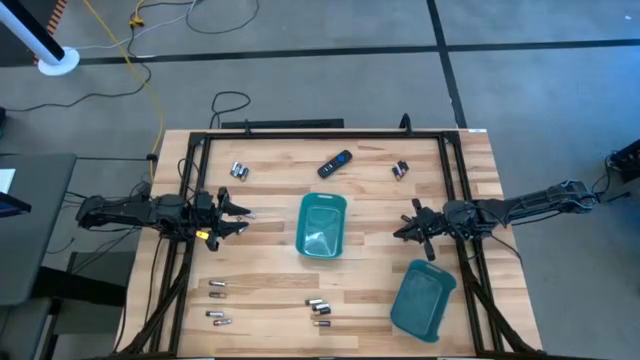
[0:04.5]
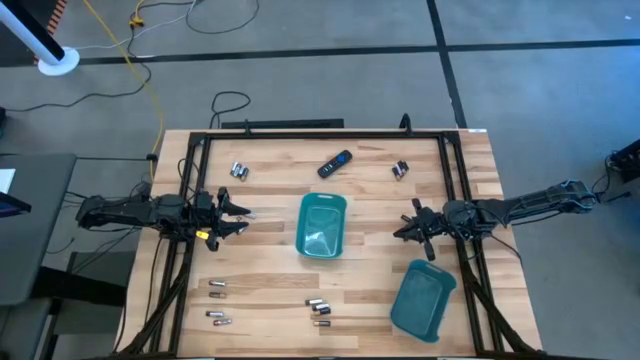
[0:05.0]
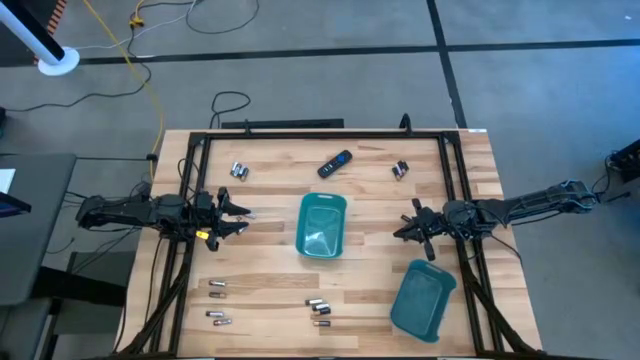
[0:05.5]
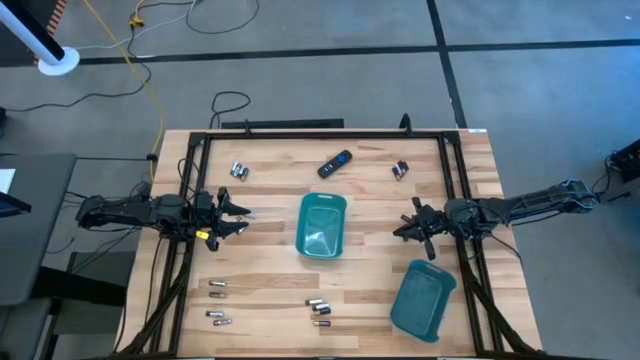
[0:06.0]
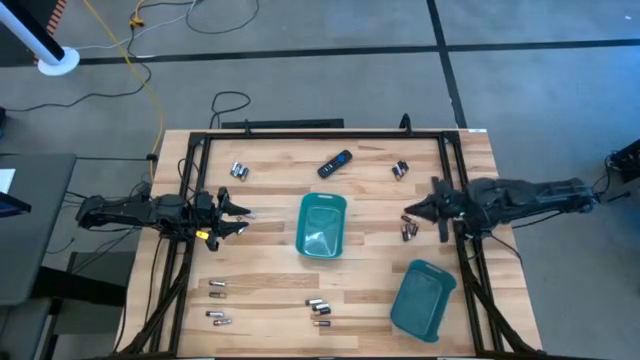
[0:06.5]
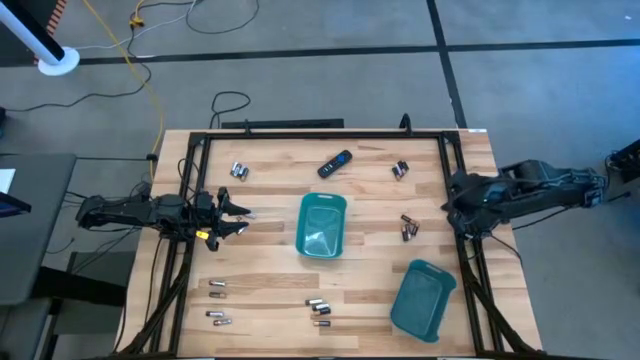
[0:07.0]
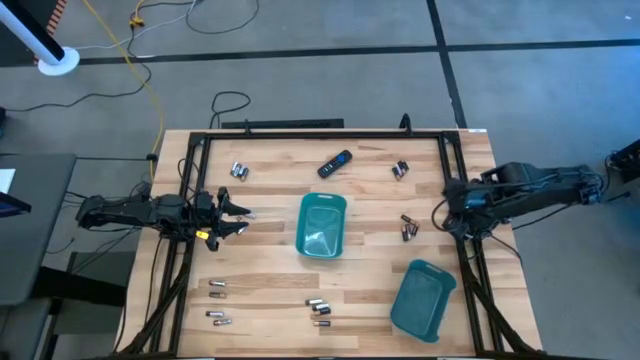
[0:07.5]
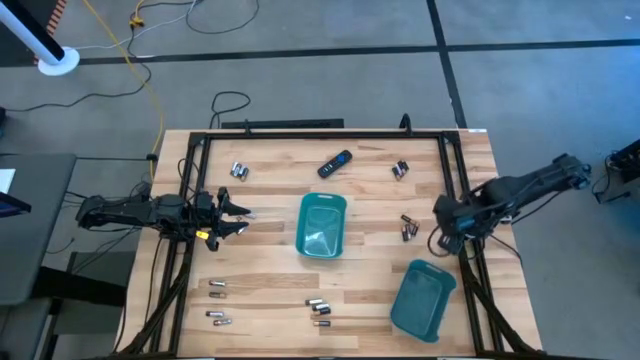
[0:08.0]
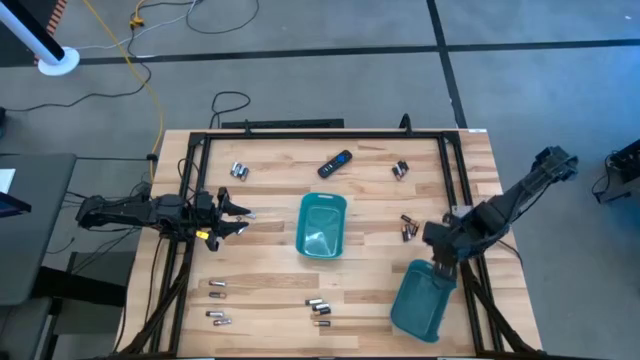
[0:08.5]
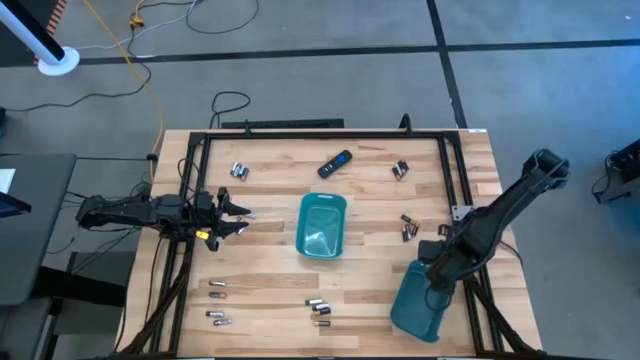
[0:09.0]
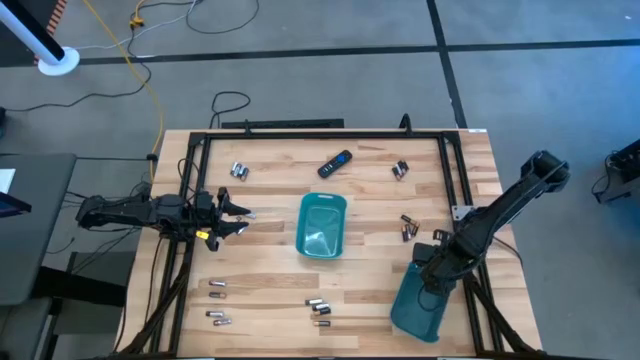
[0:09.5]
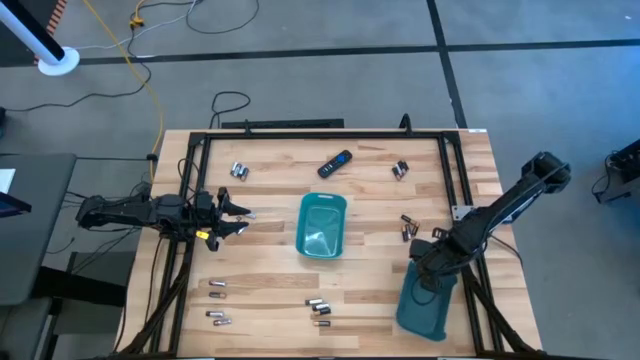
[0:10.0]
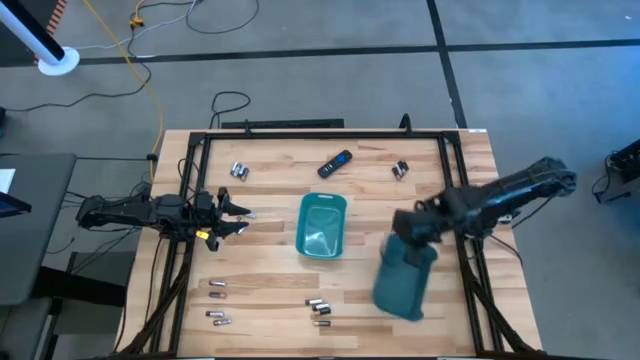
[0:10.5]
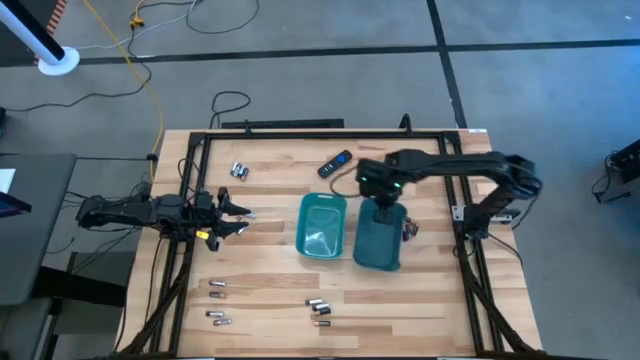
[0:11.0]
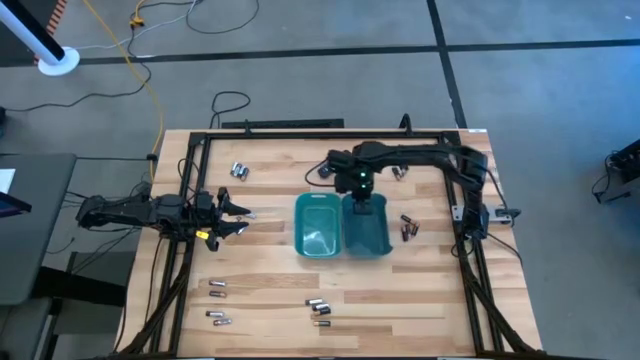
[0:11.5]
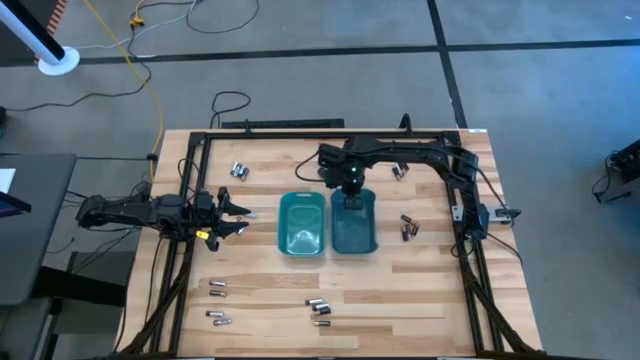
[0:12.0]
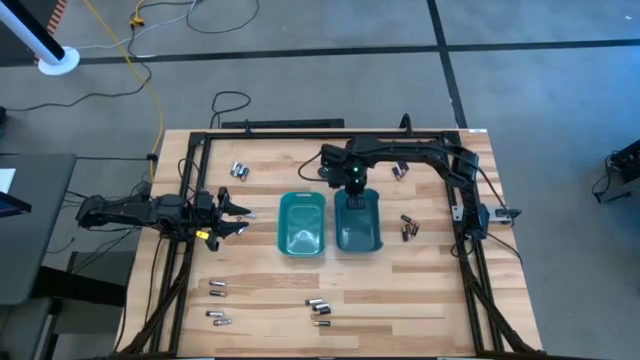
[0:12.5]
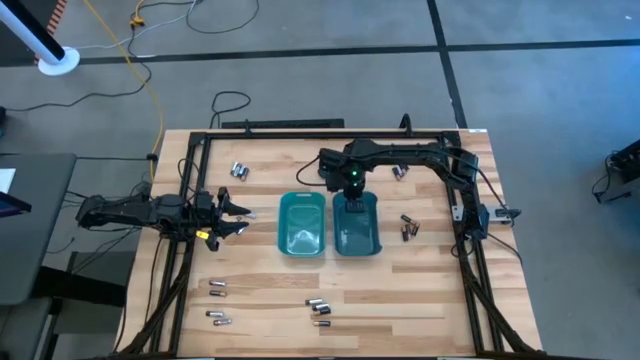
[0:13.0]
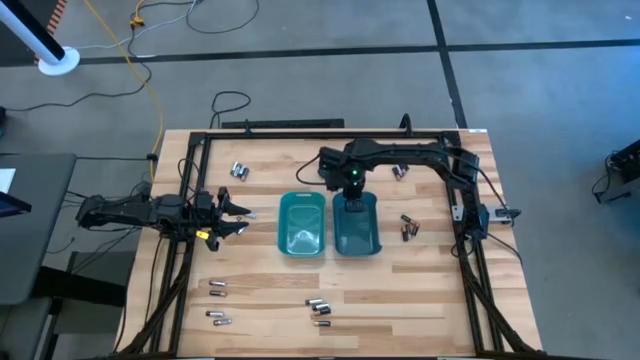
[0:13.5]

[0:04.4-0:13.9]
Task: Sort batteries
Move the dark blue bin to the center of the table

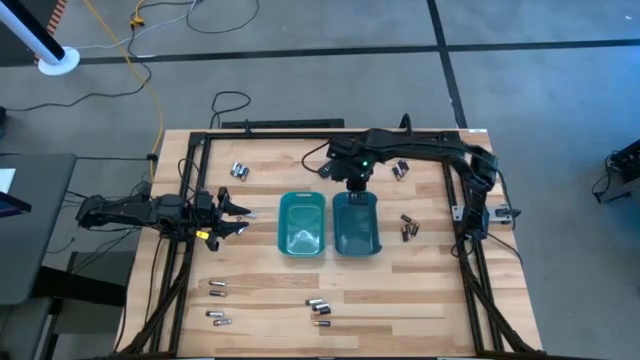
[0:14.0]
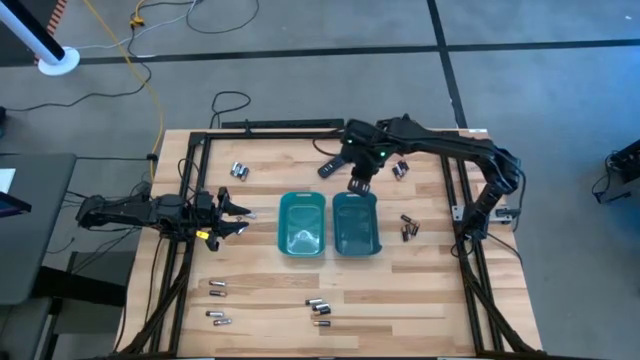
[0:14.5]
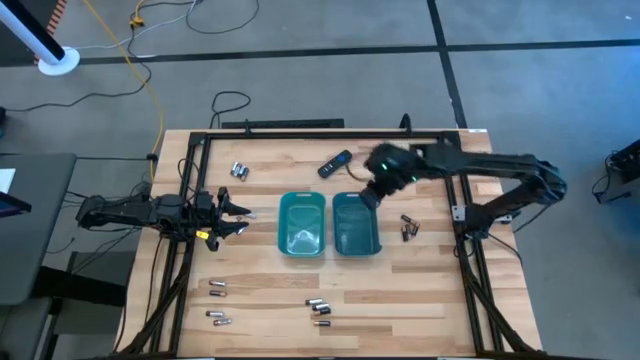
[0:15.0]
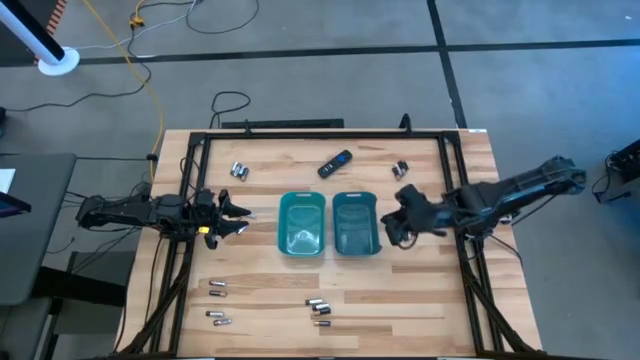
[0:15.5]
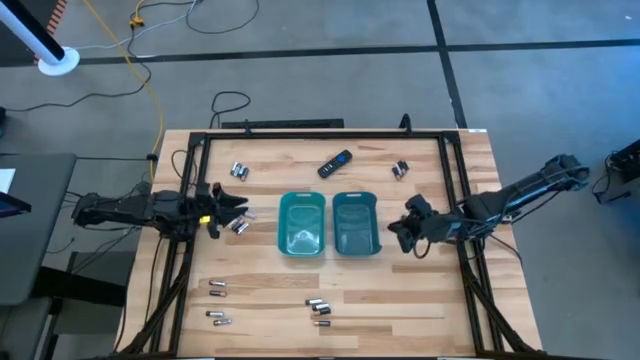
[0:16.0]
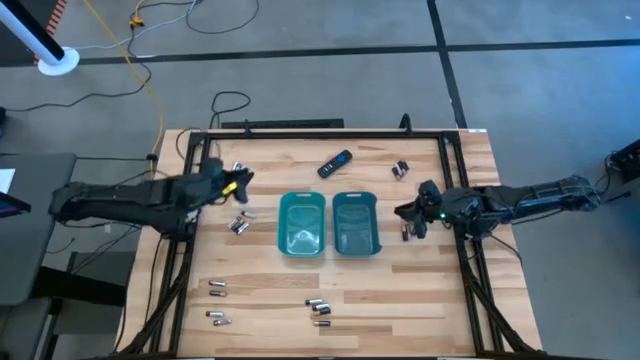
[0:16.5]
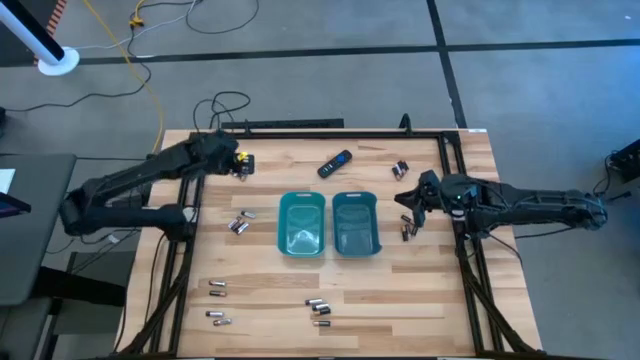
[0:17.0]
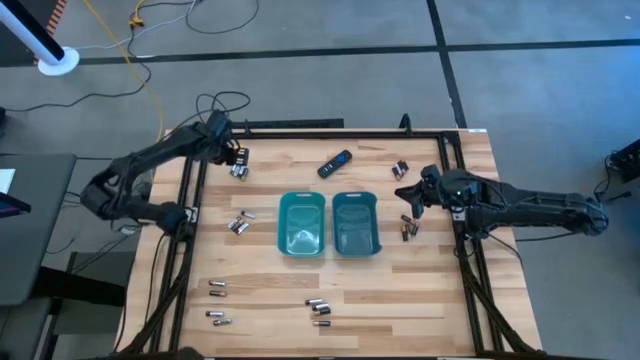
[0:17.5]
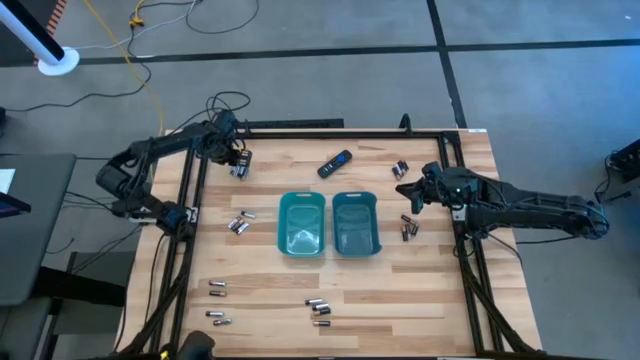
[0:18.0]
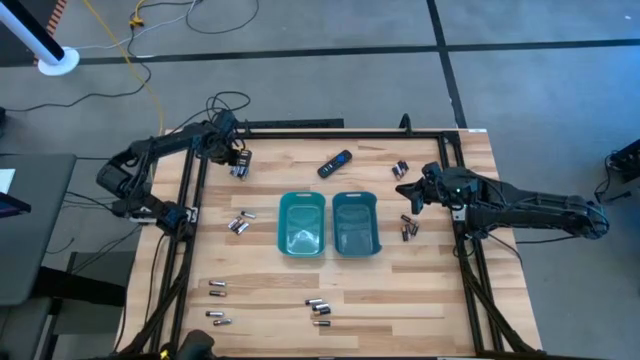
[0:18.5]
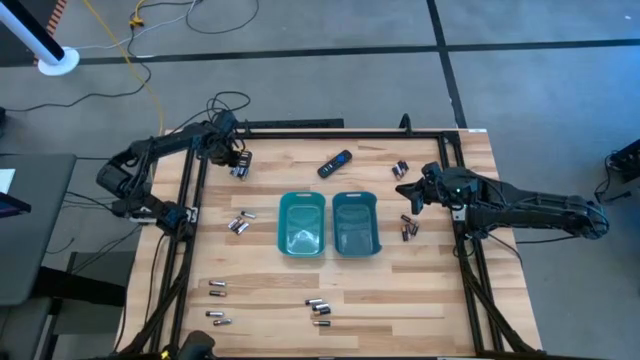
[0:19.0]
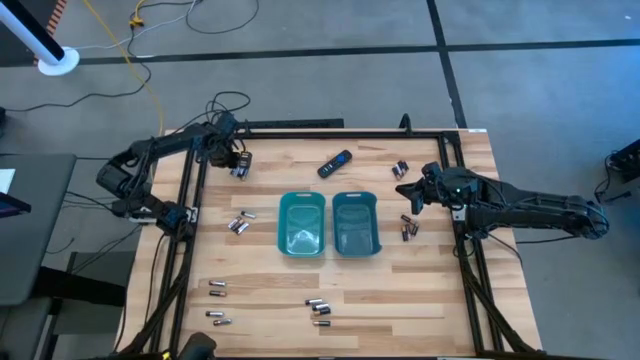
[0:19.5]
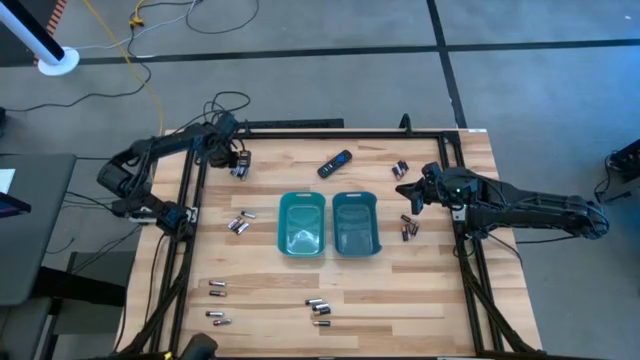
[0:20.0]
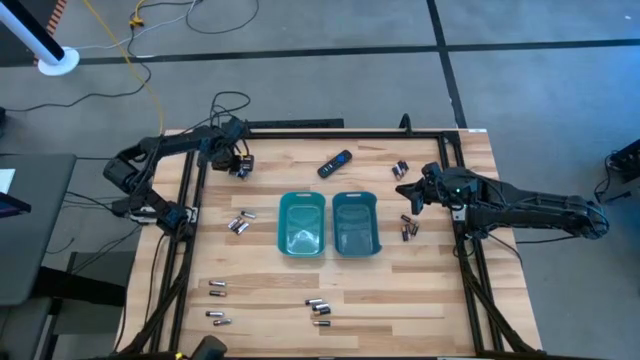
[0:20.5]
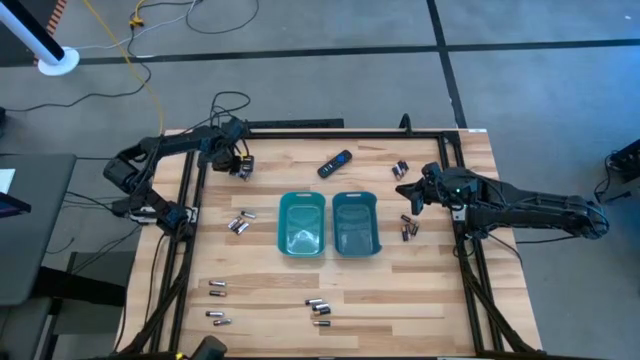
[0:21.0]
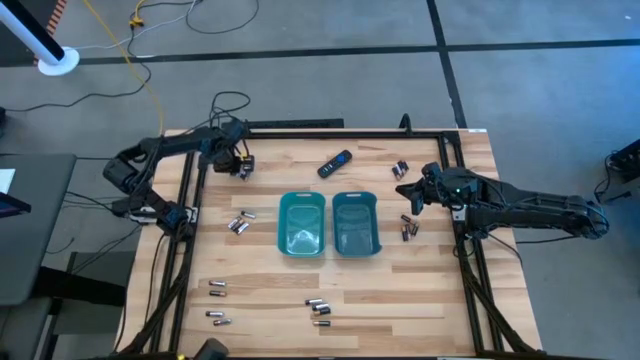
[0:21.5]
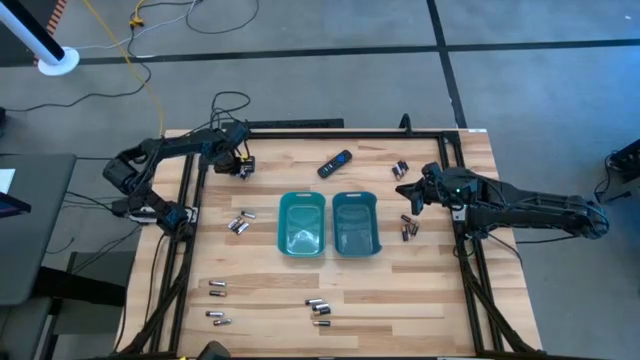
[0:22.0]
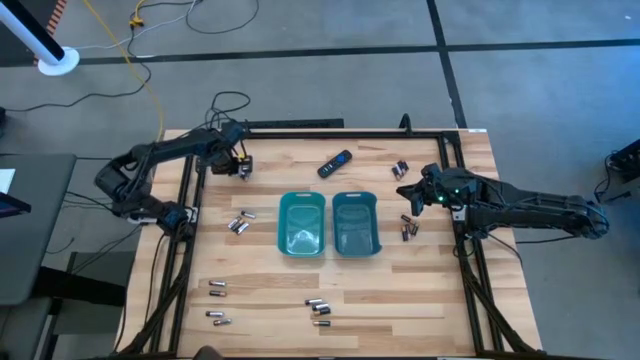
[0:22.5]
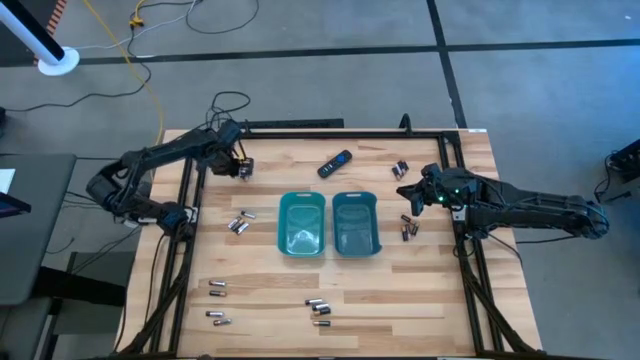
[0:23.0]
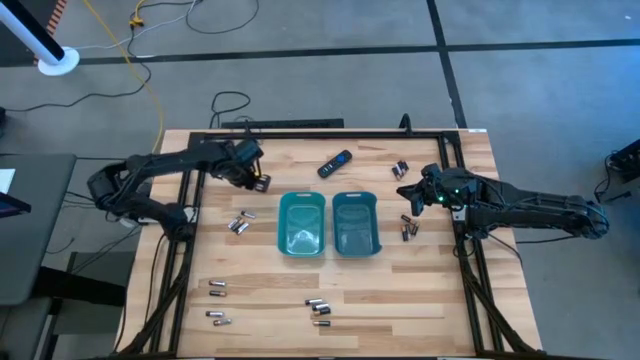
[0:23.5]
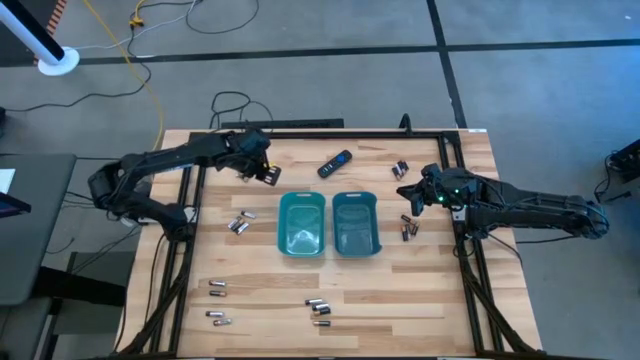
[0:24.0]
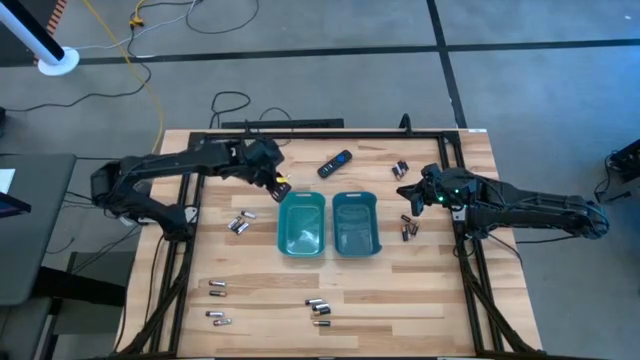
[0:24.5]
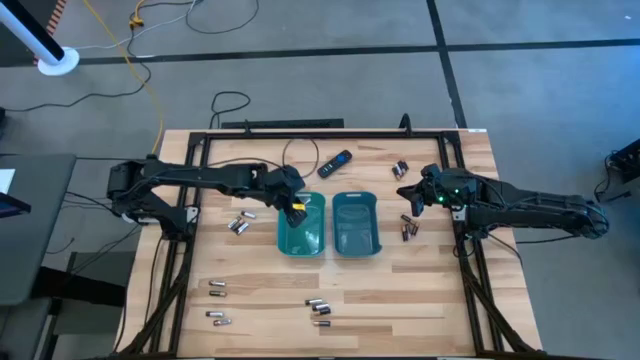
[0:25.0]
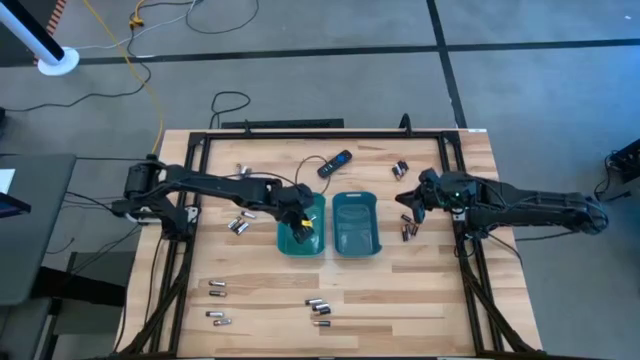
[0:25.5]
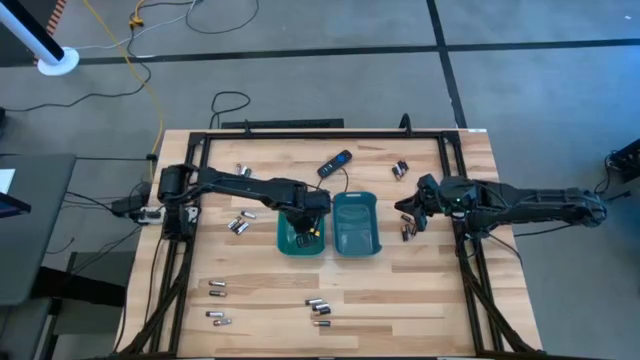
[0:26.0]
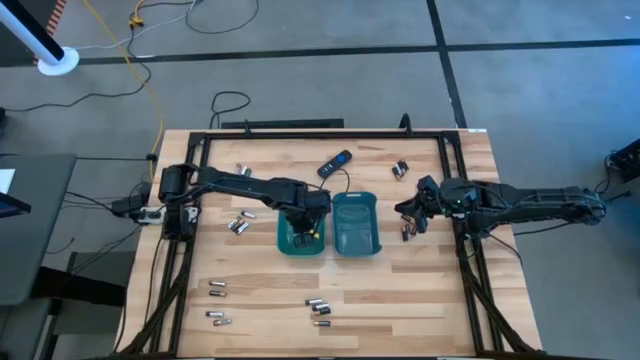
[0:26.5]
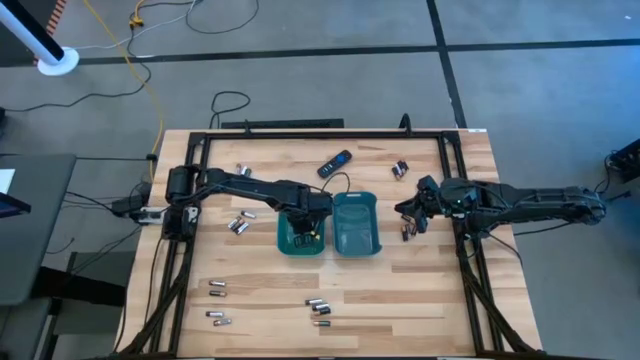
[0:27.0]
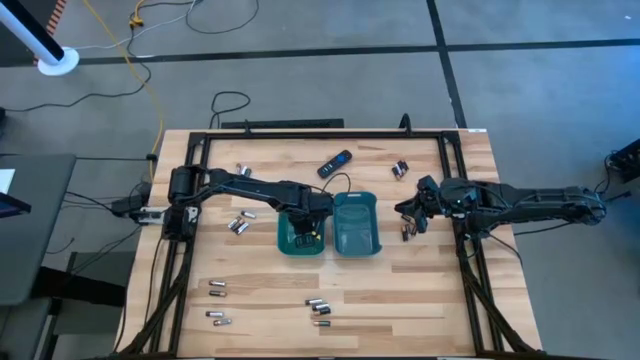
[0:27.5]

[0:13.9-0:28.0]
Put the silver and black battery into the green bin
